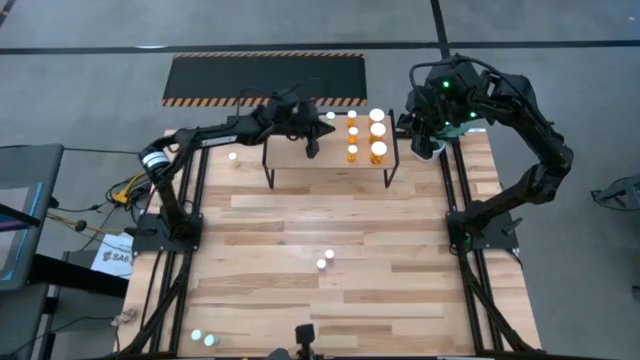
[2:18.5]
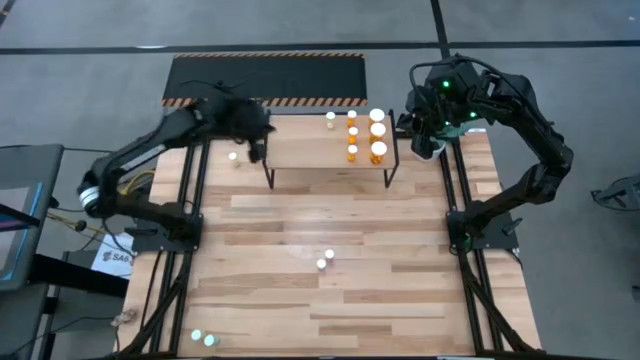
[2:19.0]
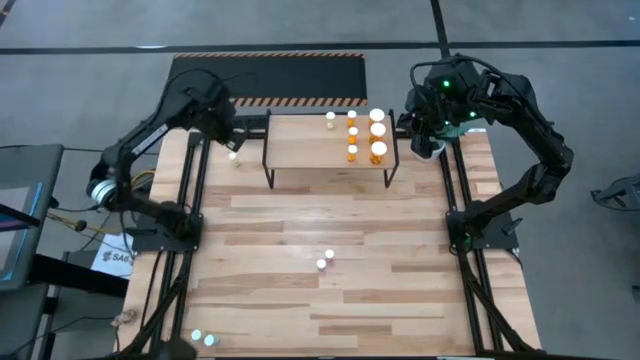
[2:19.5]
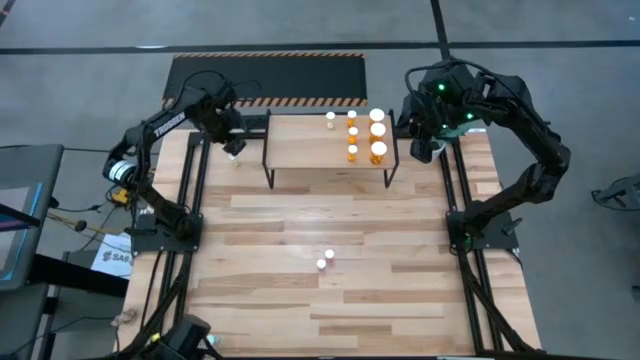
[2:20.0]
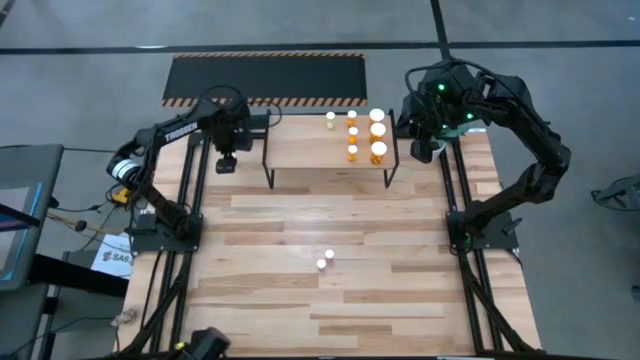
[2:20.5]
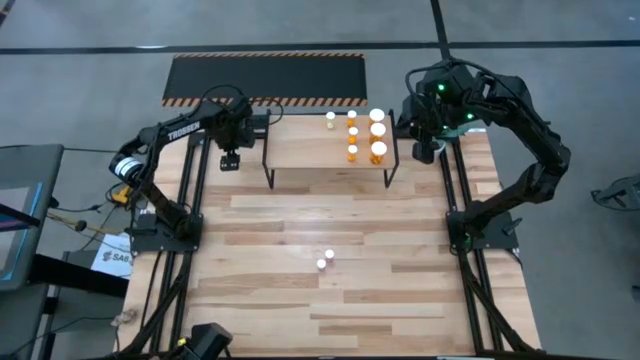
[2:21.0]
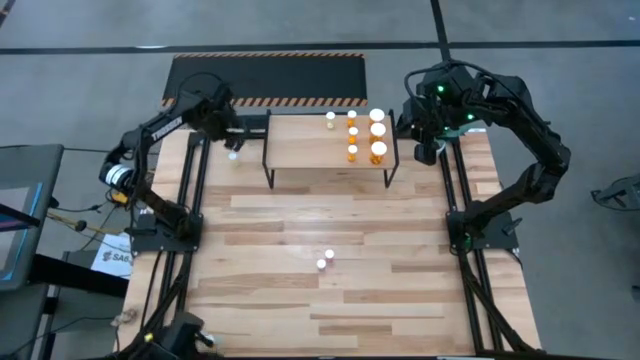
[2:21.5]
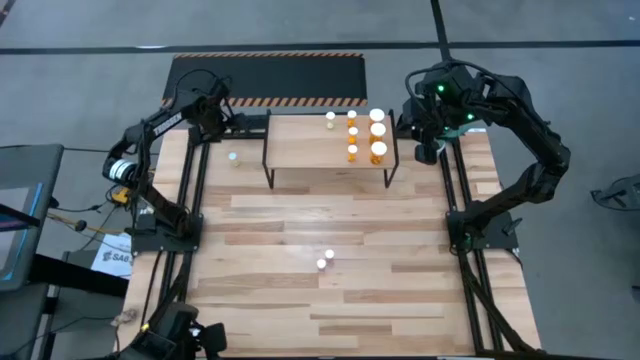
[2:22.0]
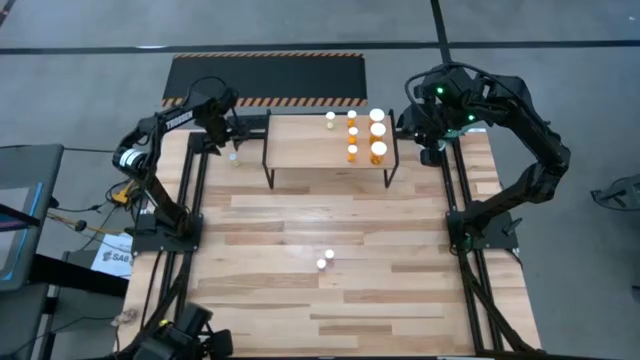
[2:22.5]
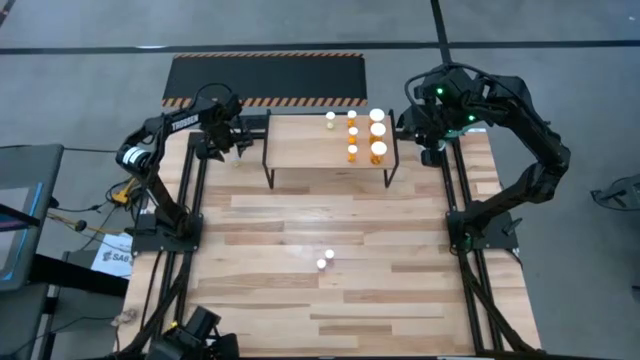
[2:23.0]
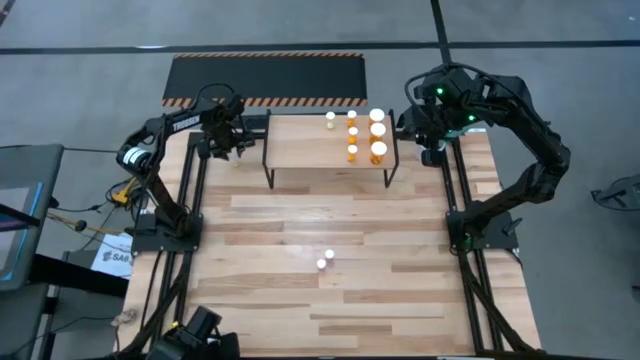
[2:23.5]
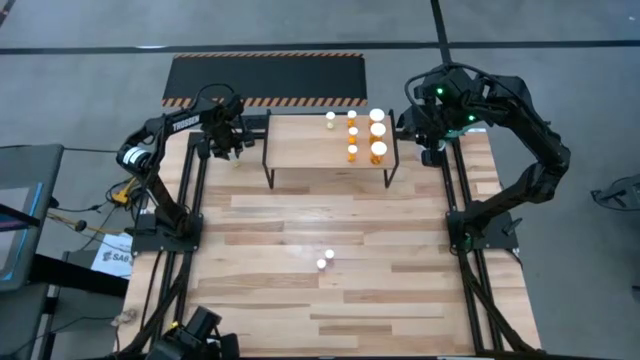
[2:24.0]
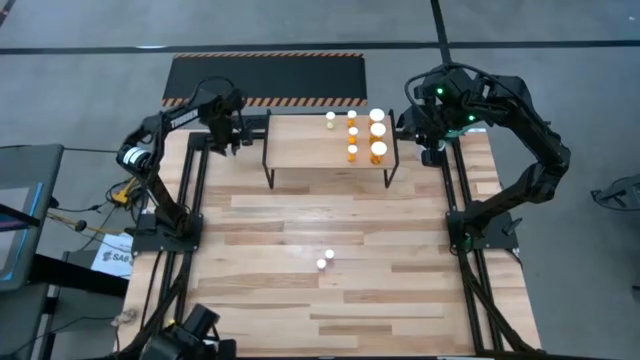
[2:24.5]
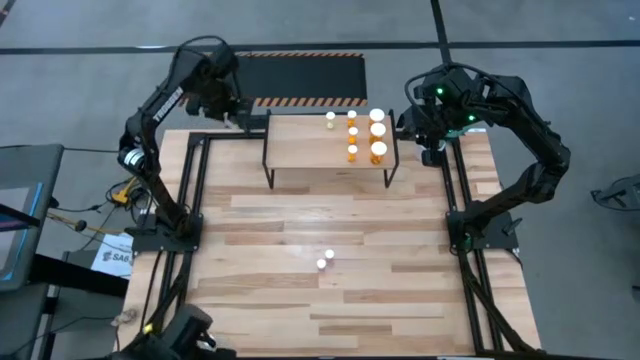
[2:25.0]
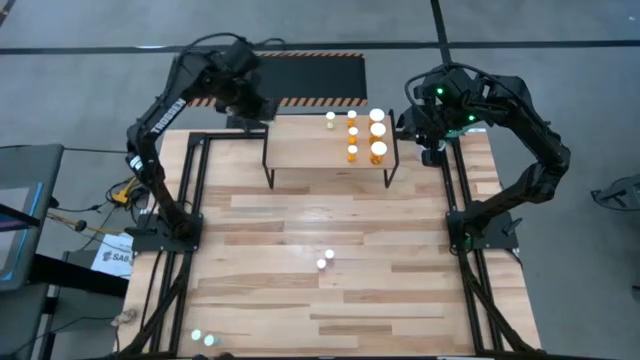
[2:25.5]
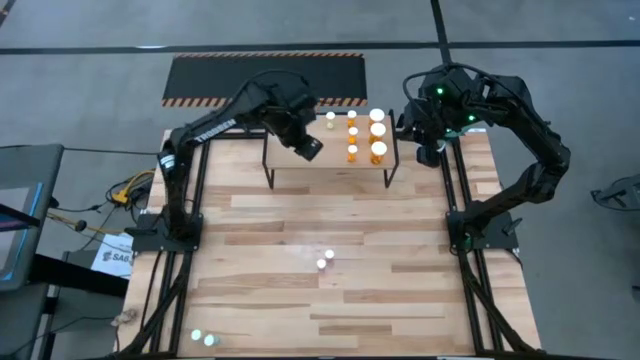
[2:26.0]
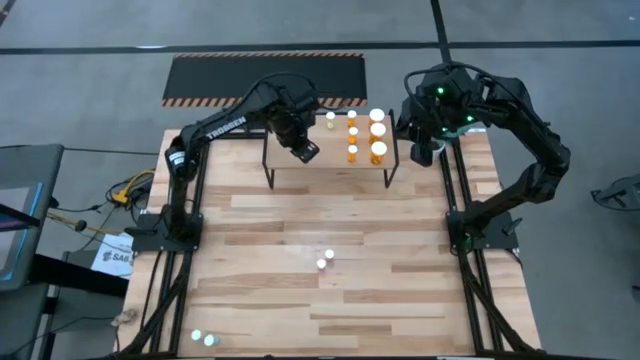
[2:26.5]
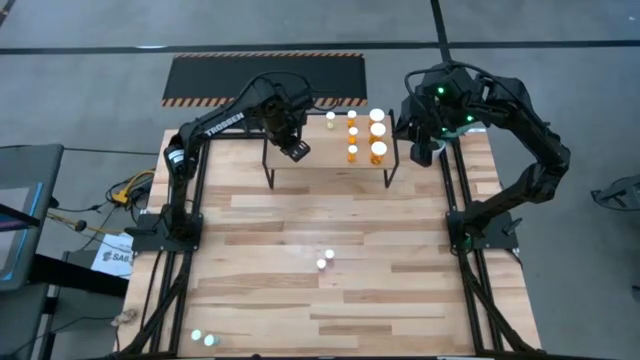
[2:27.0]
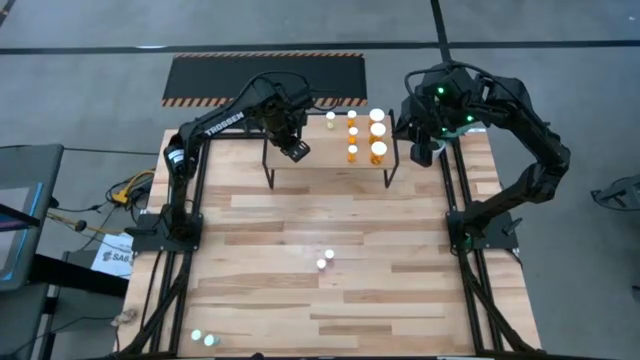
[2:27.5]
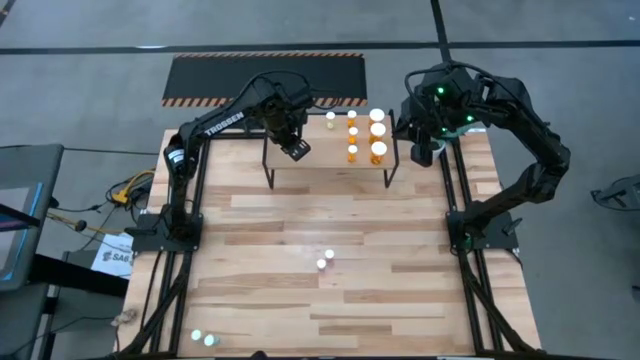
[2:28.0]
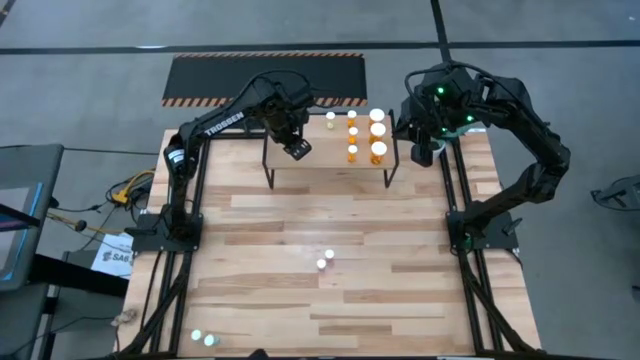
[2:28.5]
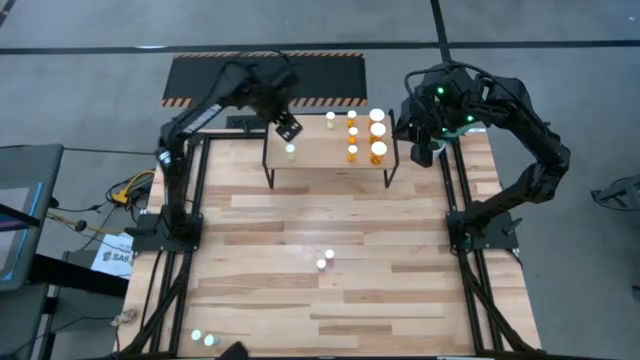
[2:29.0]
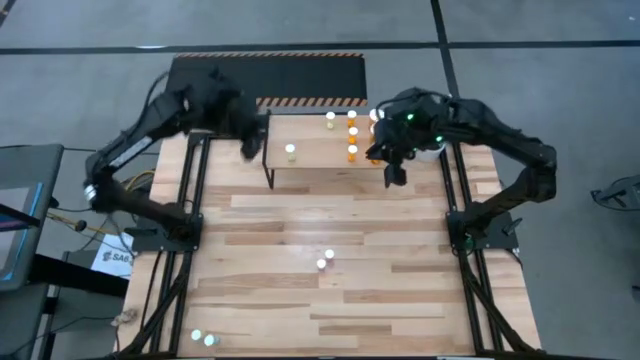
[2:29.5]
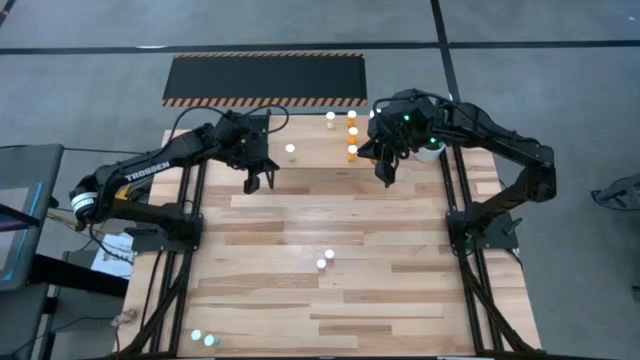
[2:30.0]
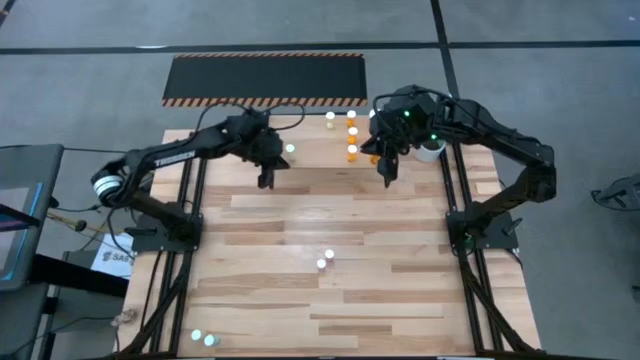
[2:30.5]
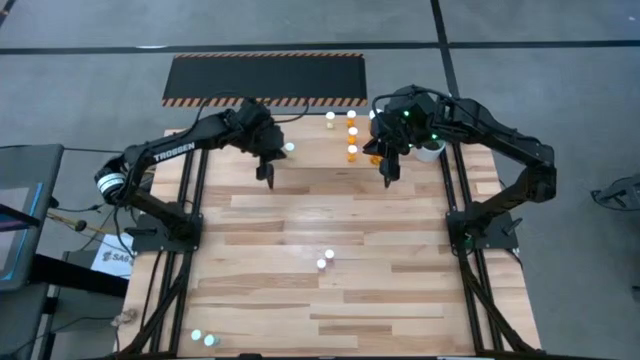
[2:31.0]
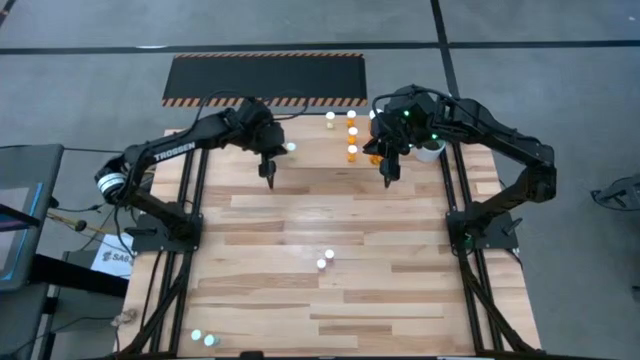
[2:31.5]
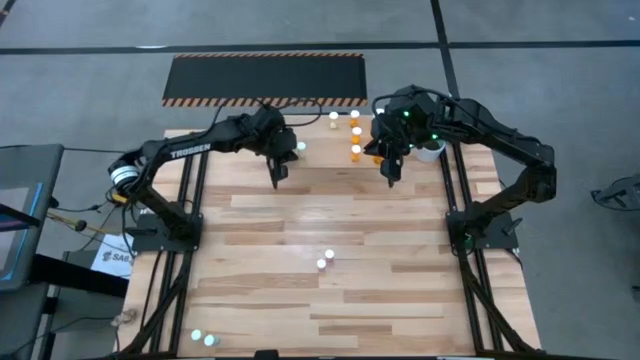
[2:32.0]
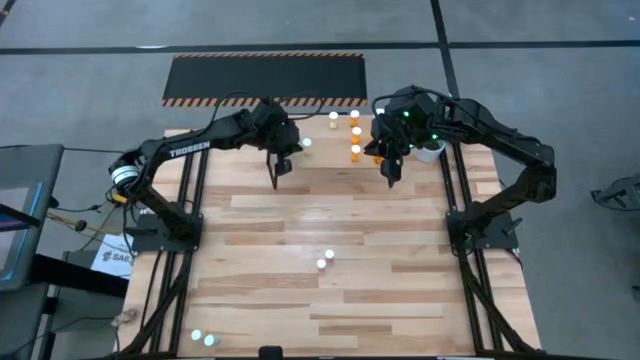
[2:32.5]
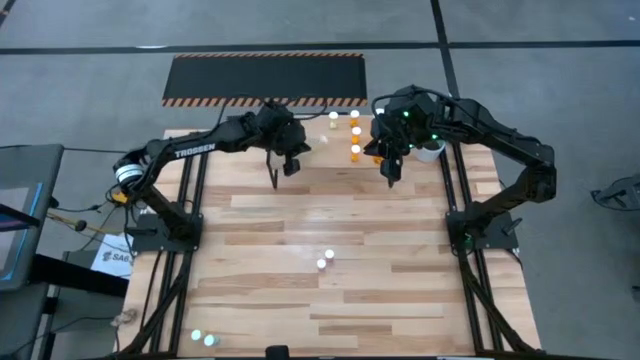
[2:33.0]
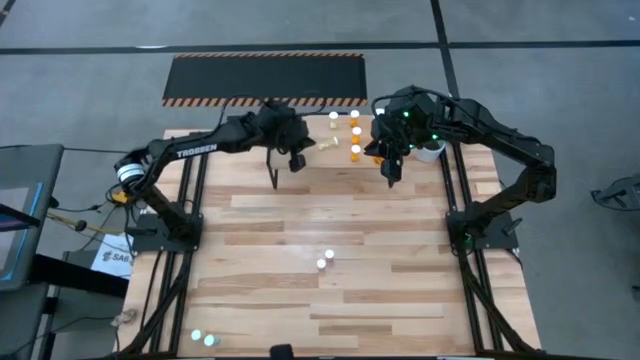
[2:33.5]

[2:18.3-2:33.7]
Task: Pick and place medicine bottles onto shelf by color
Put the top small yellow pill bottle on the shelf aligned with the other small yellow pill bottle

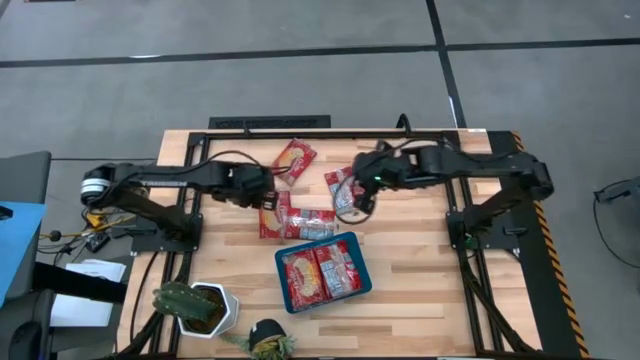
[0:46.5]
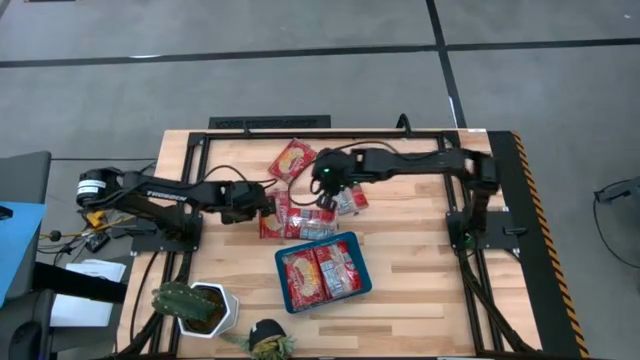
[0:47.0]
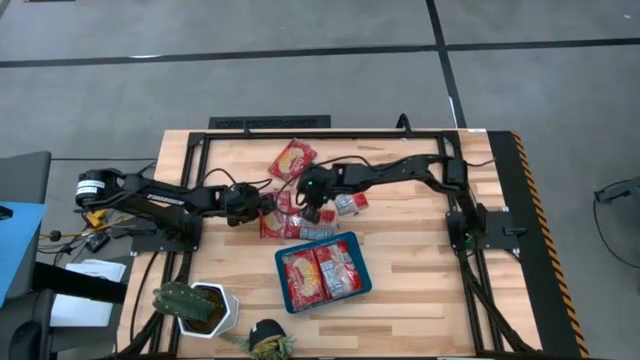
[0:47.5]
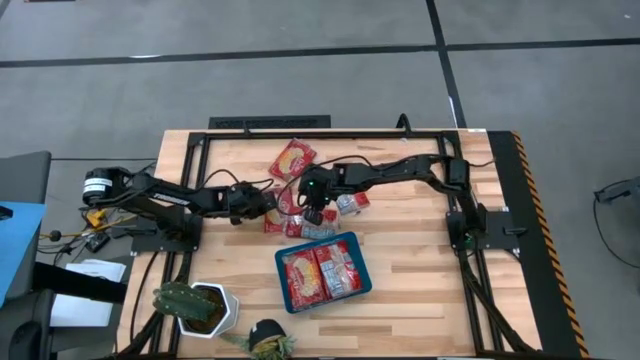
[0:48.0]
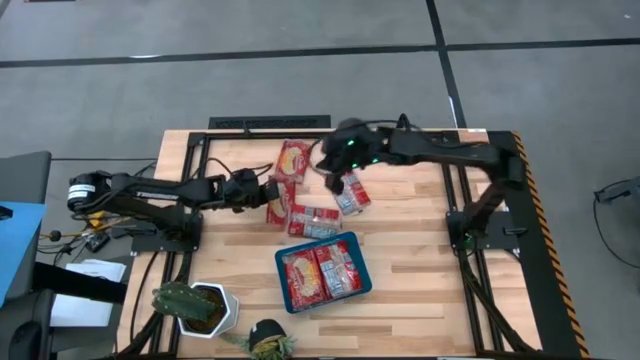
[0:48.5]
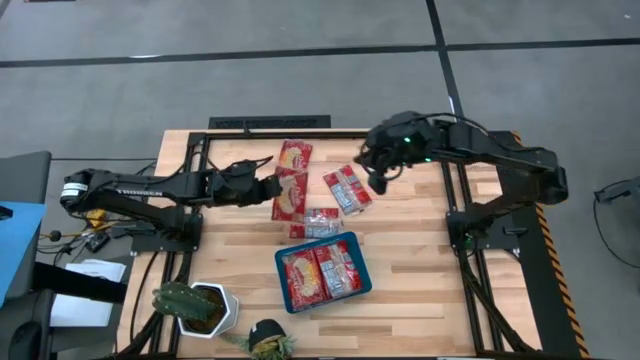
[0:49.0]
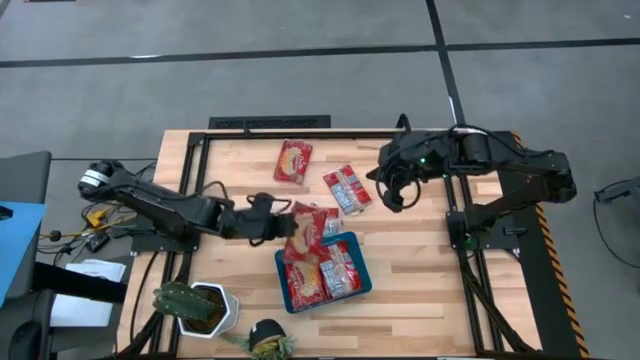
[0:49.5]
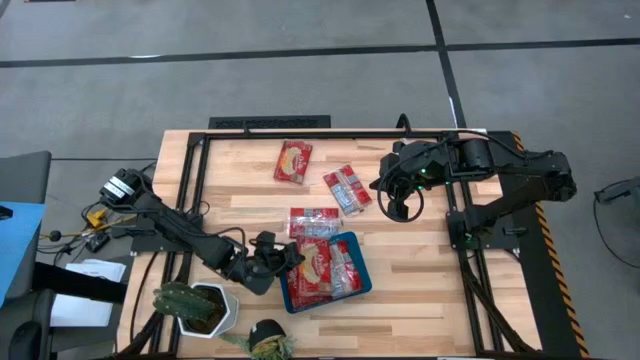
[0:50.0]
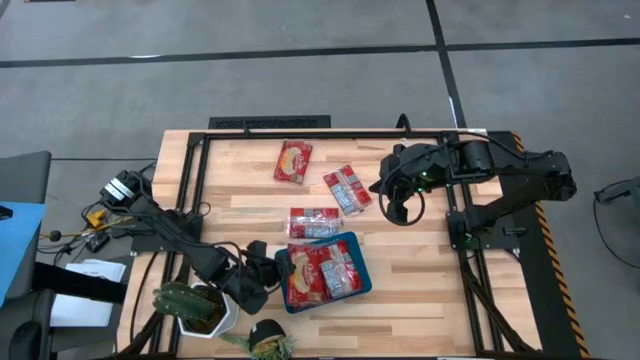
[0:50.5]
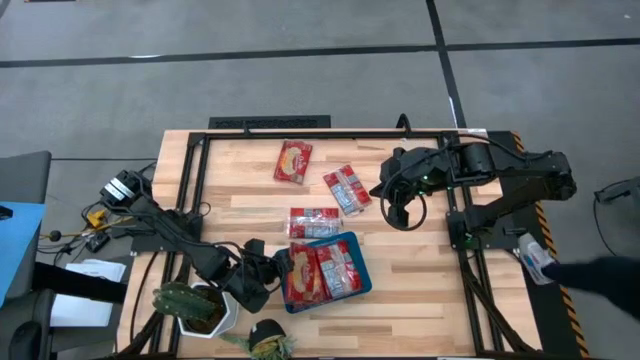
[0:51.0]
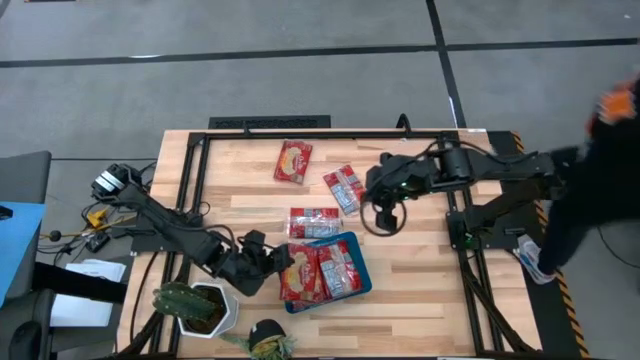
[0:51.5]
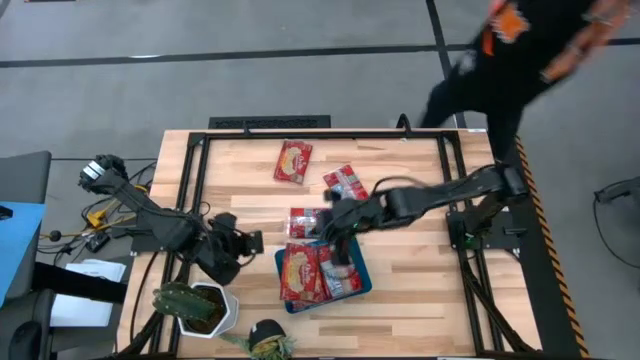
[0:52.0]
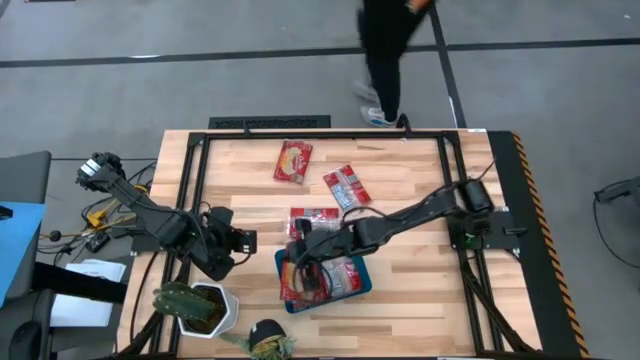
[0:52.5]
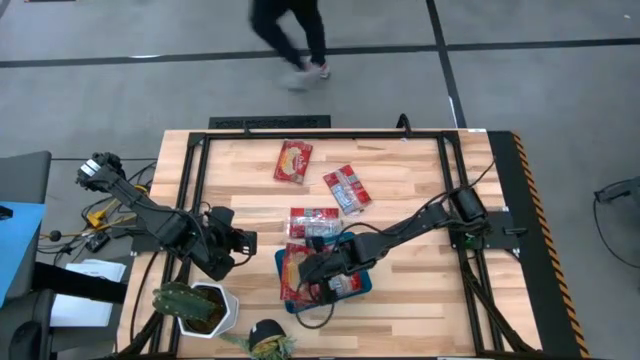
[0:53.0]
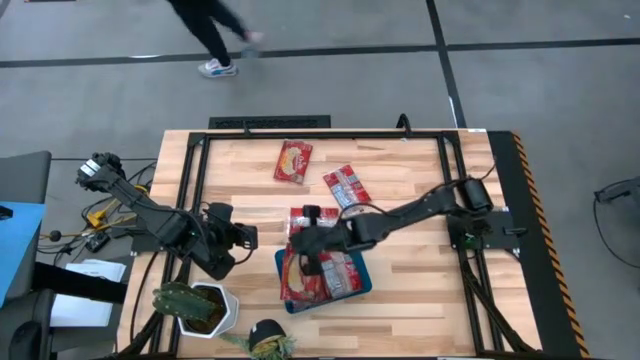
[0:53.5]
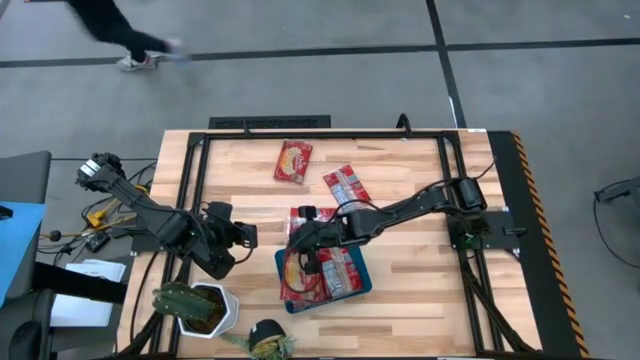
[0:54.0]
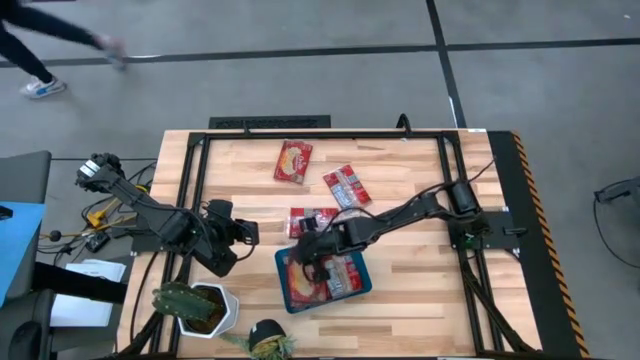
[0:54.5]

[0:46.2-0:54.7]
Task: Sort popcorn bags into baskets
Put the popcorn bag into the blue bin
